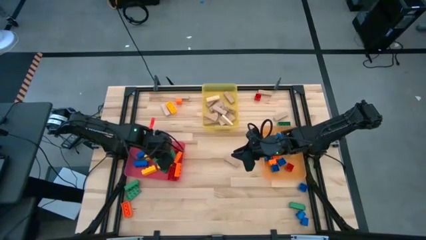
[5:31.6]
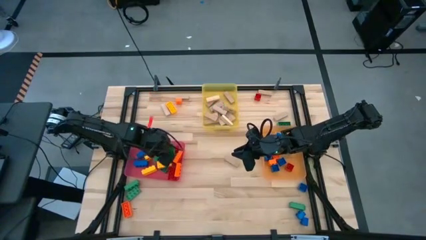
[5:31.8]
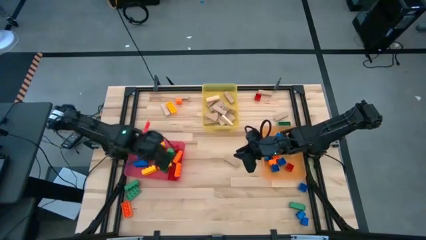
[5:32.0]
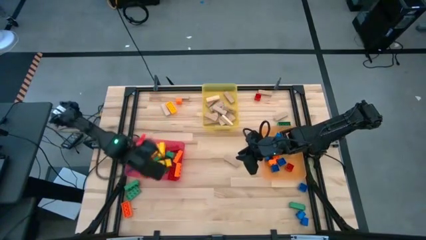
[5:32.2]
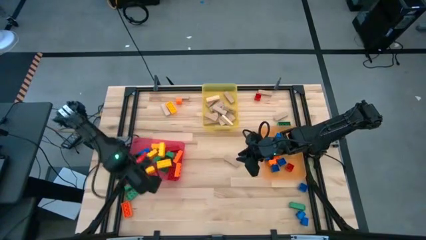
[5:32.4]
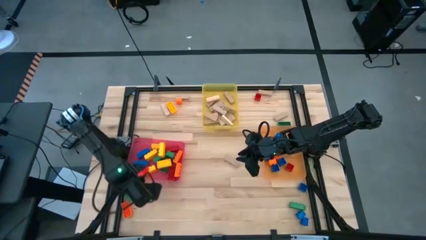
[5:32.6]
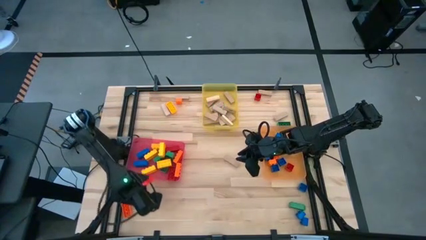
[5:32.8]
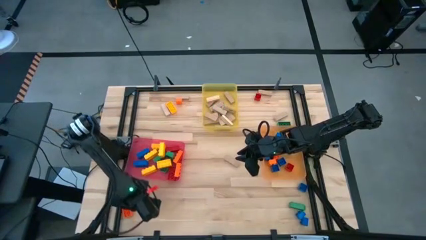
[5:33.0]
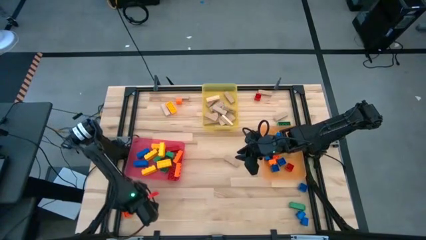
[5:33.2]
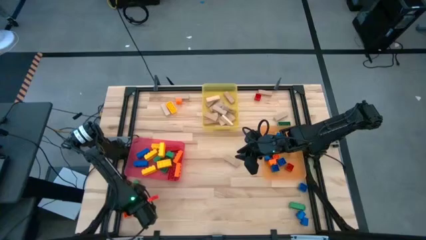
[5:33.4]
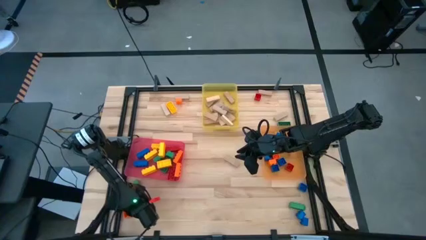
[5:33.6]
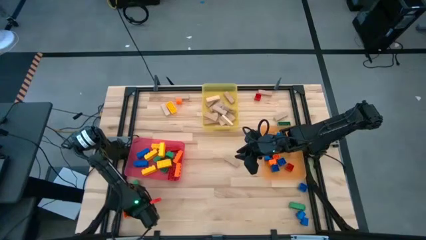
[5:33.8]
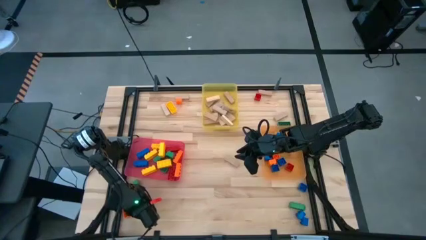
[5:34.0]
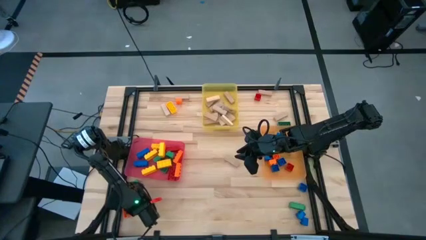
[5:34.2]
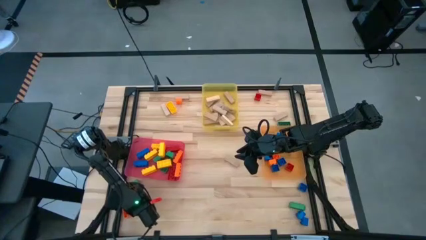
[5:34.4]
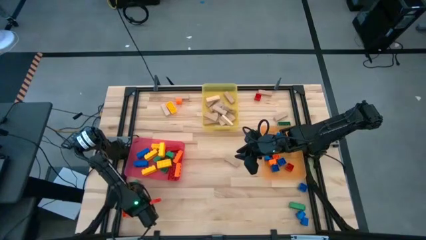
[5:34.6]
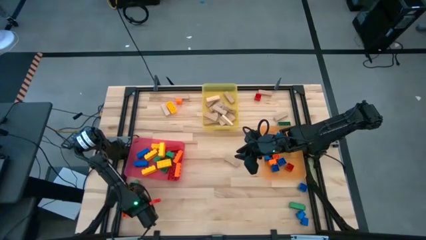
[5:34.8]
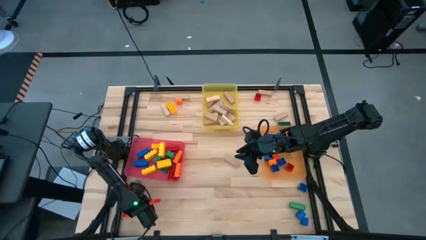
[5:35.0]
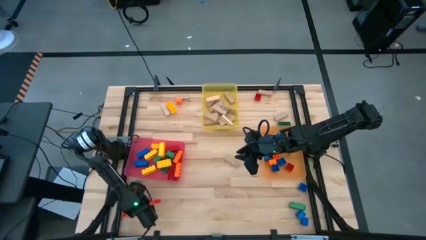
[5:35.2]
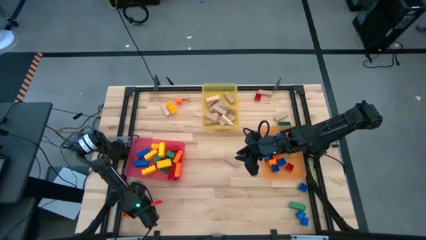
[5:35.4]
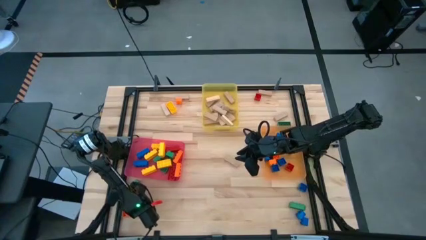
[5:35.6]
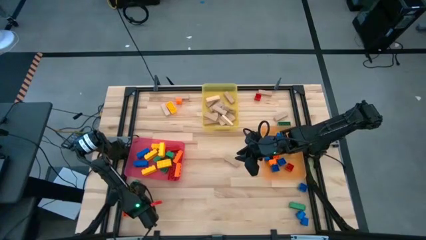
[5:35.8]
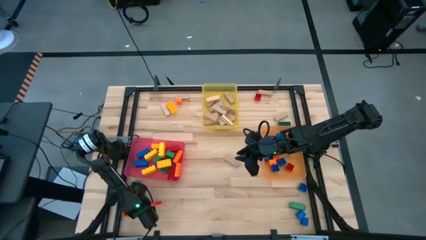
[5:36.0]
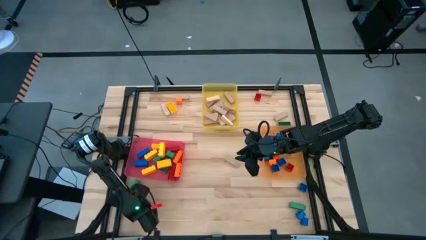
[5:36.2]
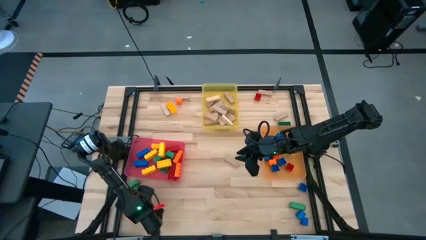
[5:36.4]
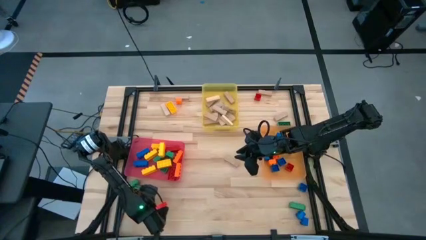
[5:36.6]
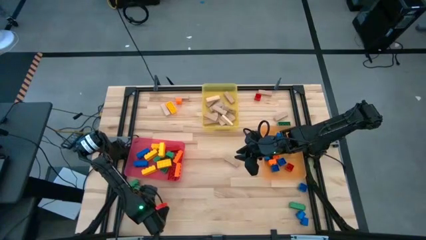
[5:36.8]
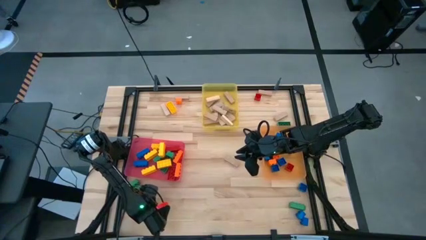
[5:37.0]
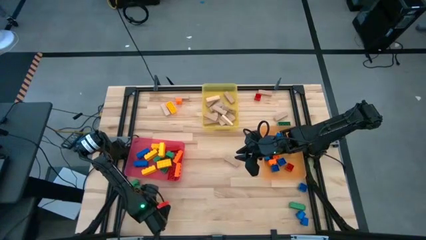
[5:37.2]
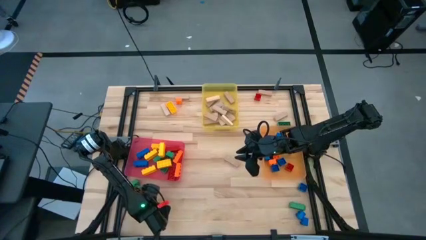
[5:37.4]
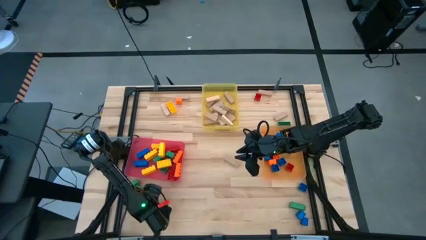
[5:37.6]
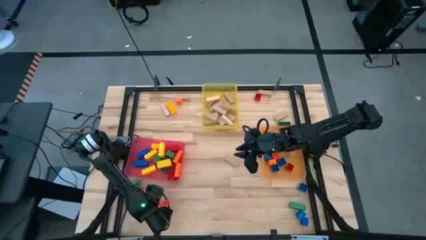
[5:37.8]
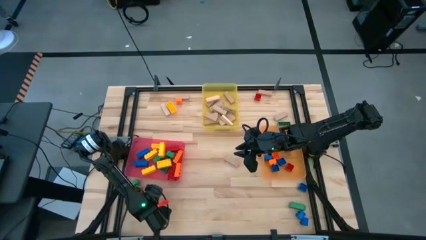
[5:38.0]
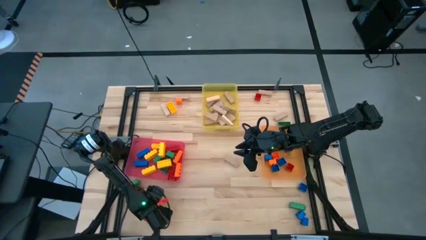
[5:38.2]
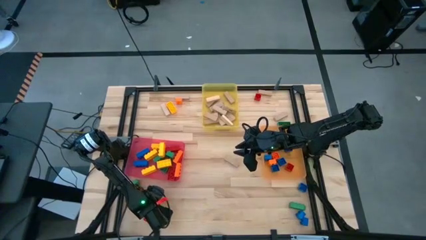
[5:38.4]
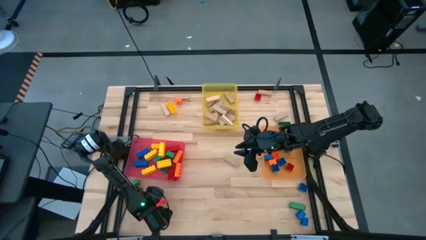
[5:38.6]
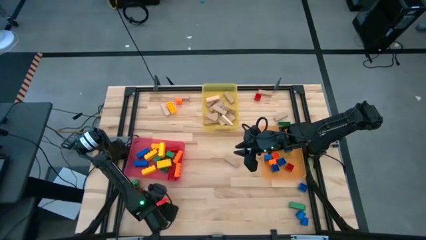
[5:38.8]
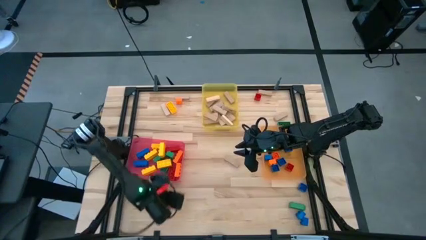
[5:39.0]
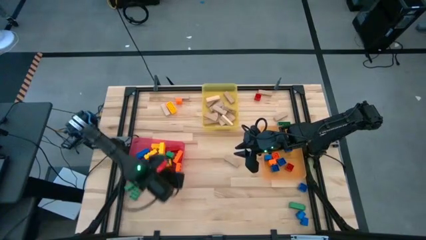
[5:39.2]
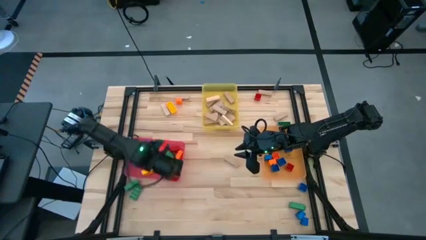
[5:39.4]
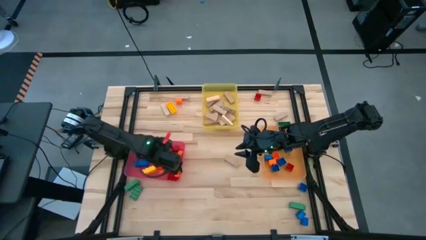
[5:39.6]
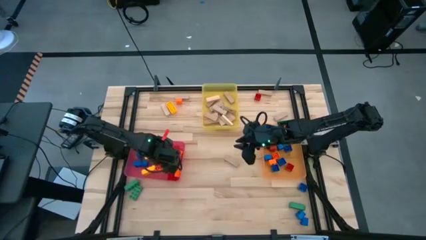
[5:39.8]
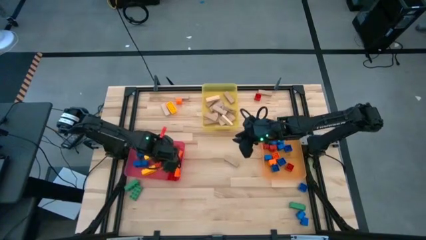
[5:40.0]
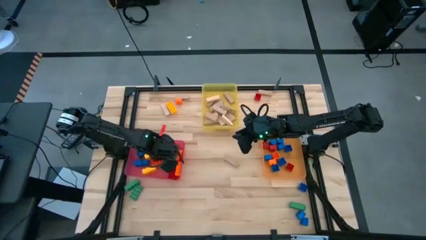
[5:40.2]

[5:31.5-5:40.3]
Task: Sort blocks by size
Put the 3 stud orange game piece into the pink bin

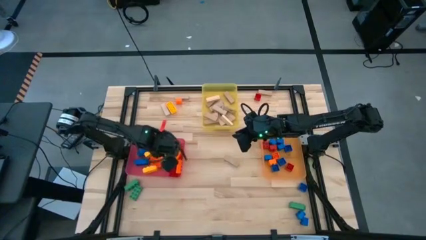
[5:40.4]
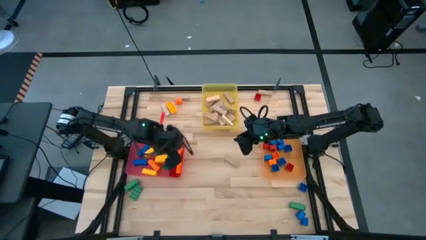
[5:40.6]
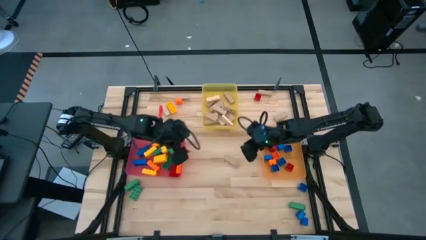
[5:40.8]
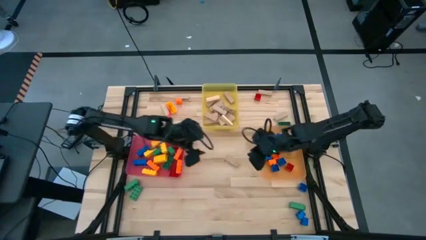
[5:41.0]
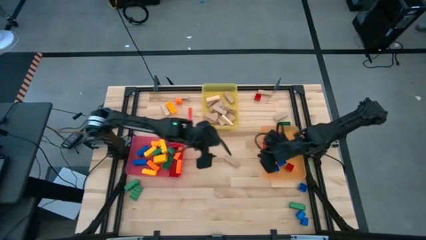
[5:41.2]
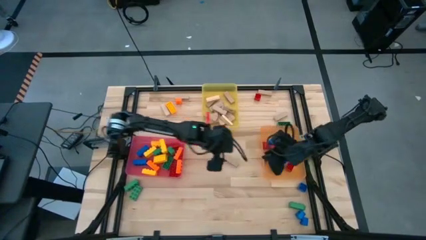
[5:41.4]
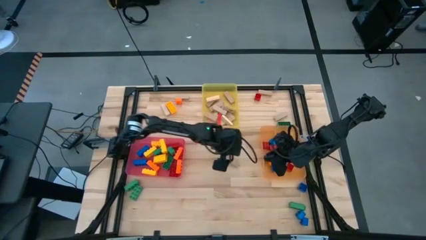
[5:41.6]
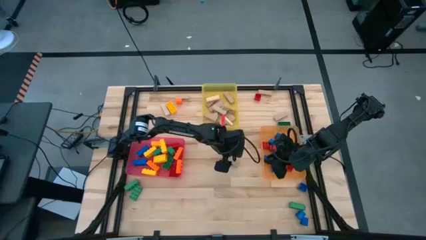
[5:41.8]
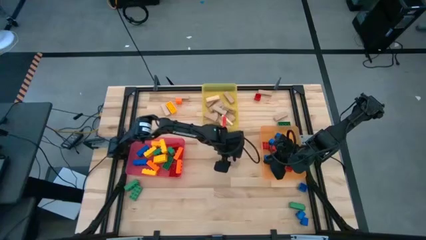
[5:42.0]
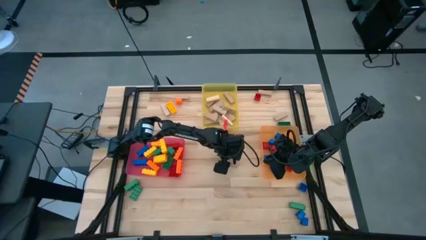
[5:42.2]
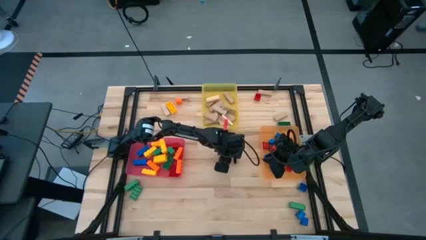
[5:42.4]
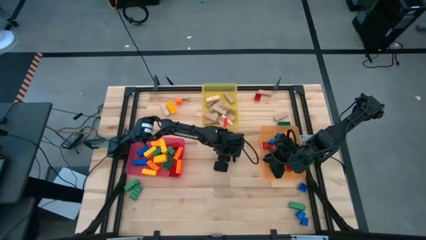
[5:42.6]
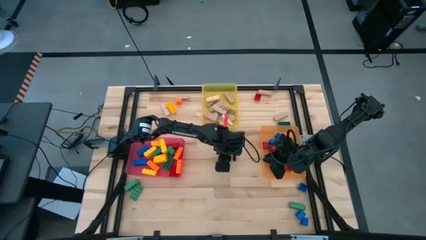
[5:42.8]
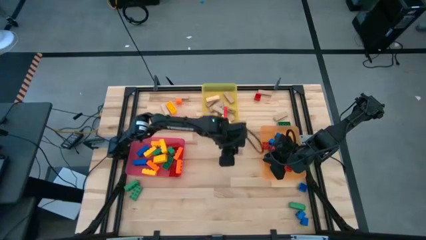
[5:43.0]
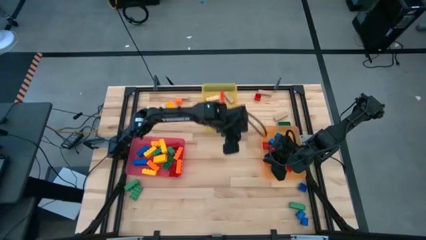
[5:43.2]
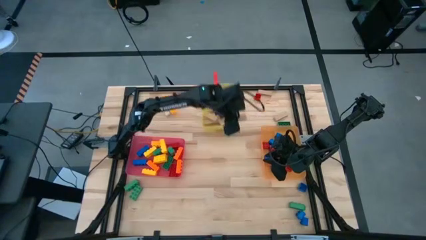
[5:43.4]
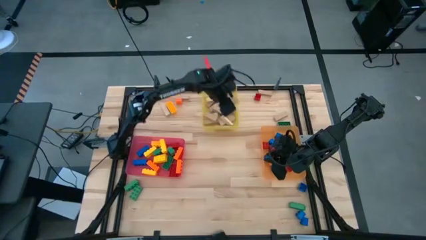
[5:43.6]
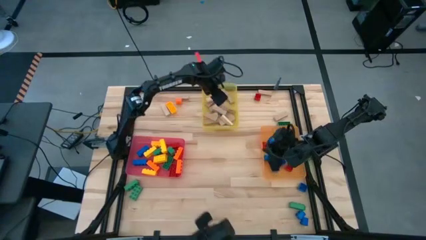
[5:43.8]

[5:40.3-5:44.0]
Put the wooden block into the yellow bin
